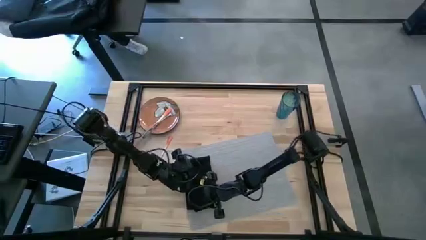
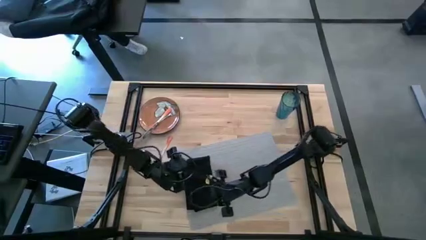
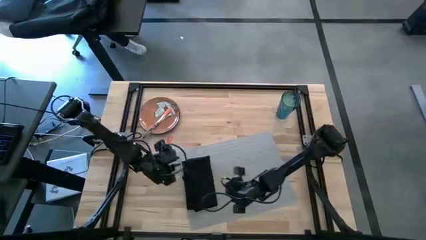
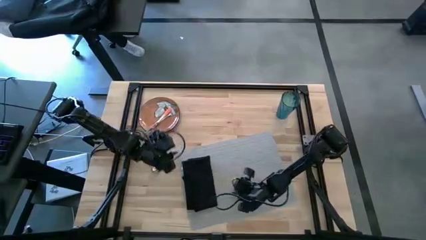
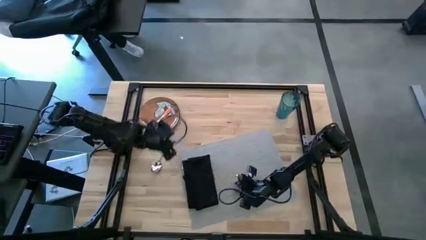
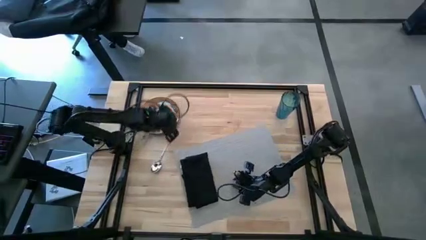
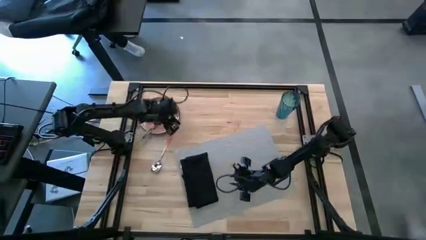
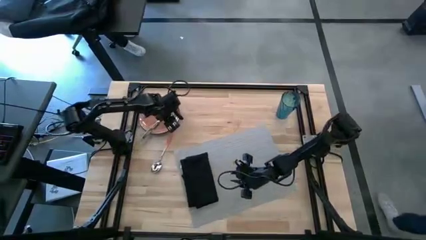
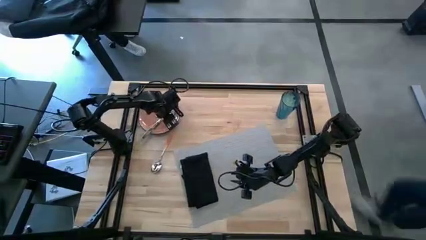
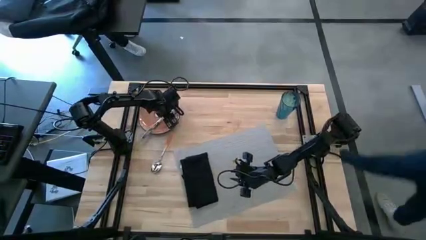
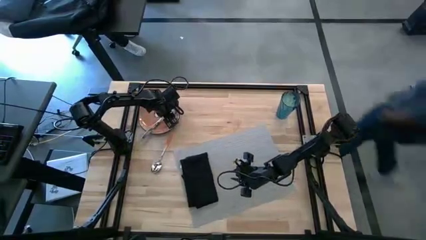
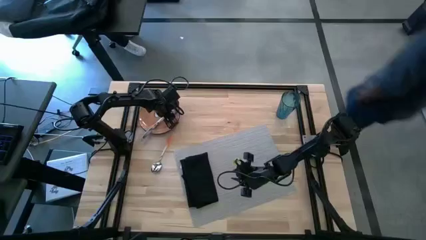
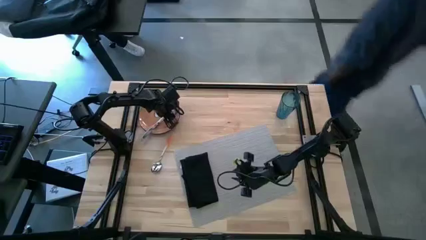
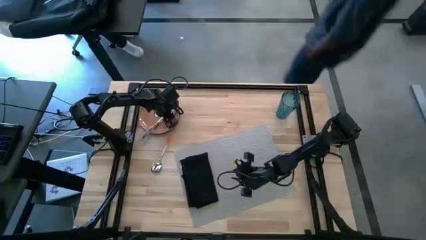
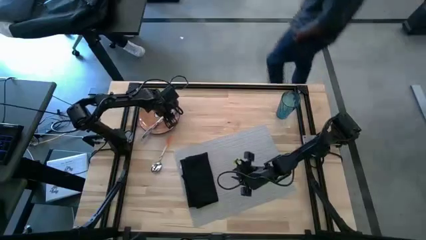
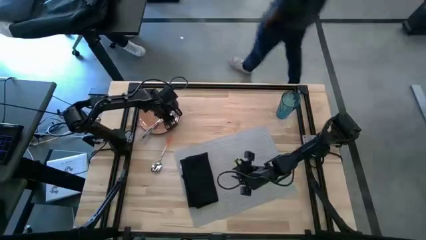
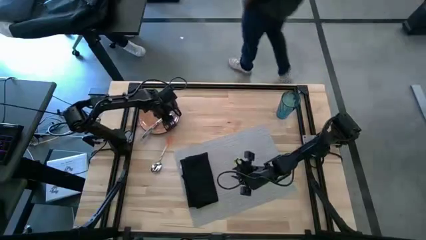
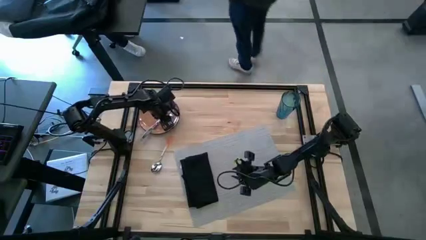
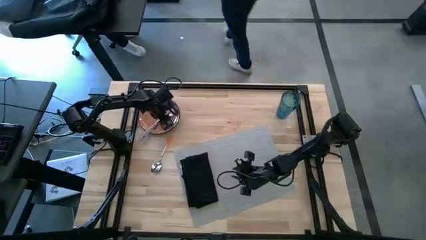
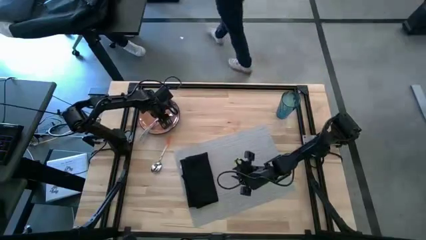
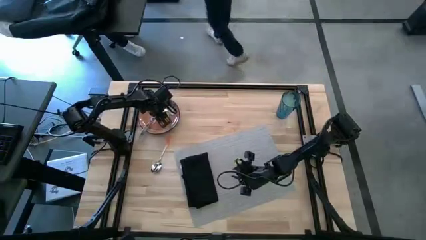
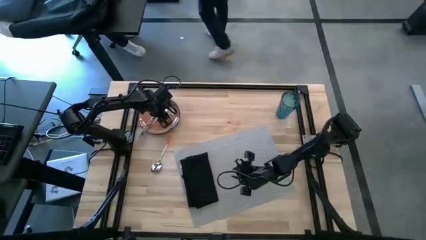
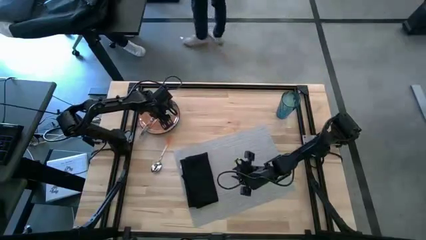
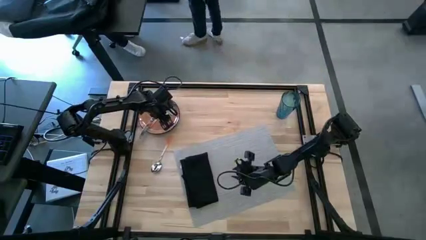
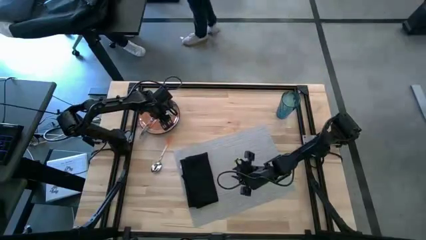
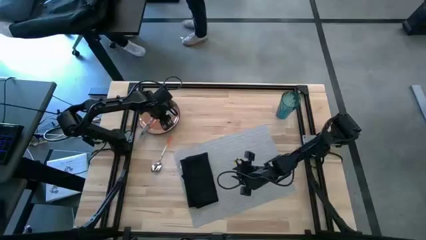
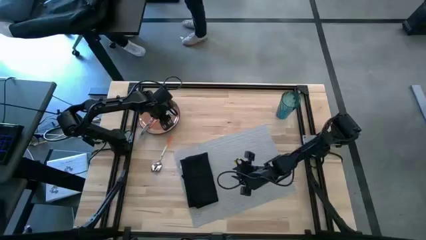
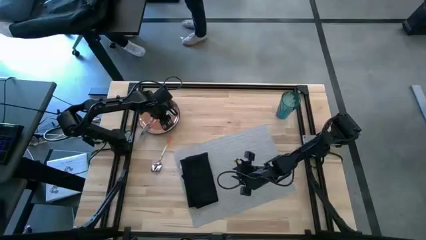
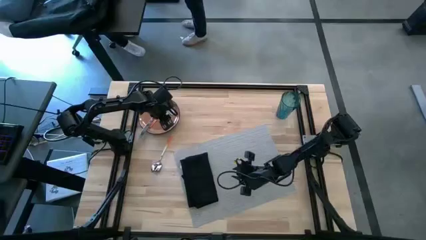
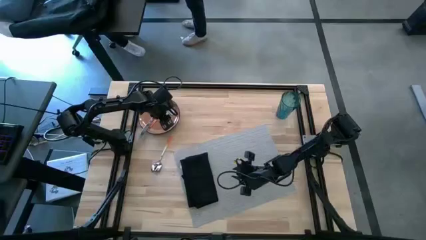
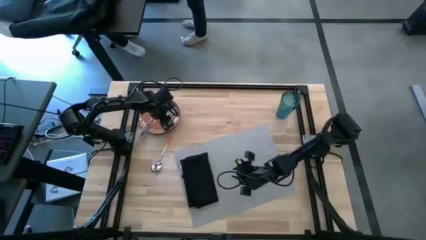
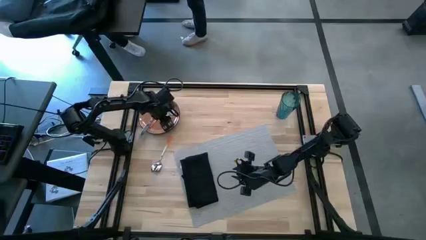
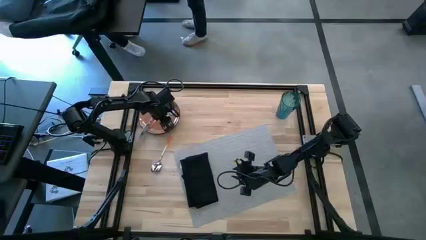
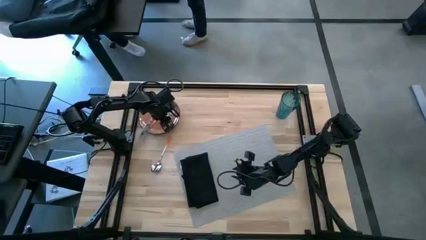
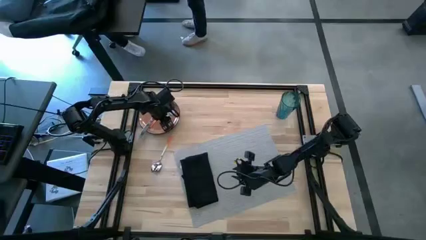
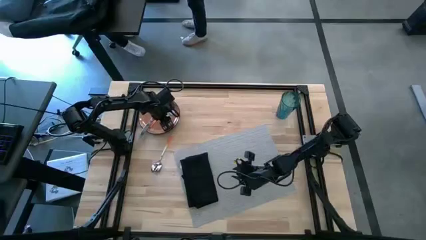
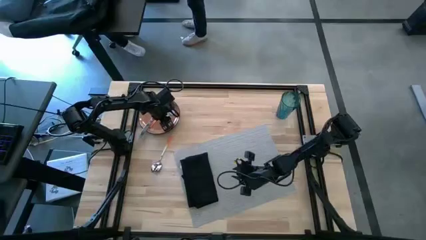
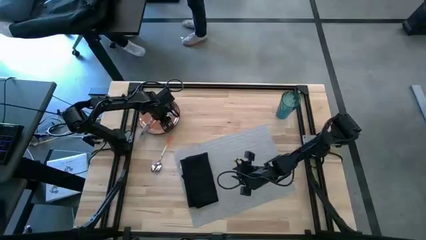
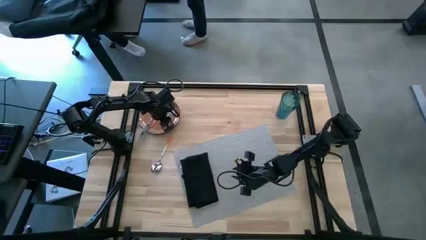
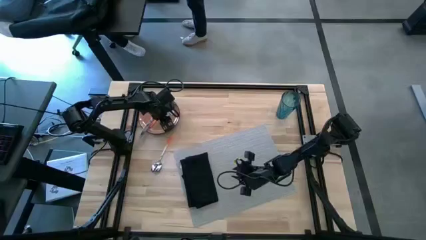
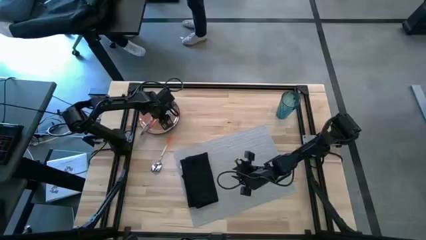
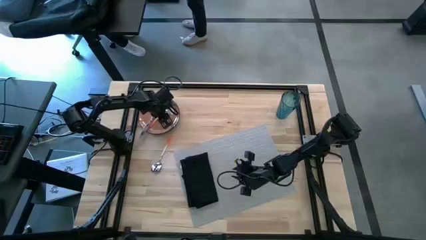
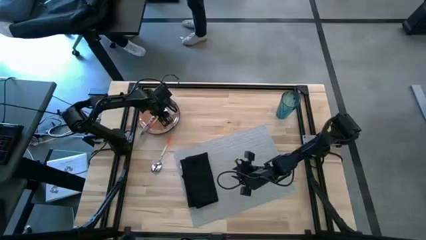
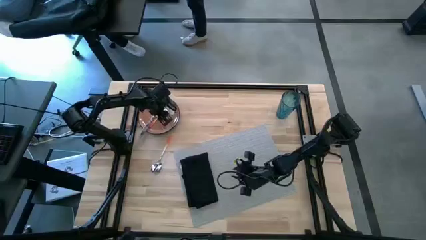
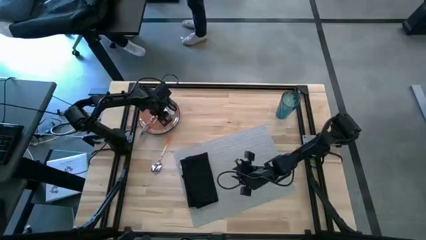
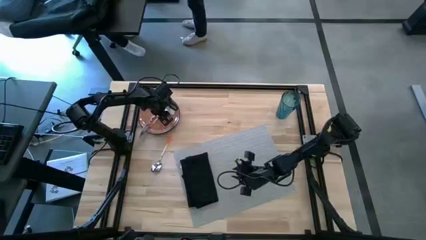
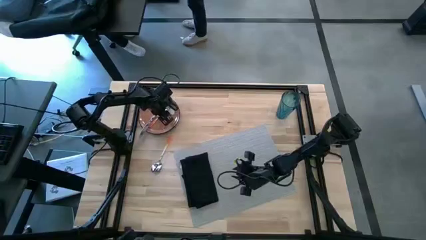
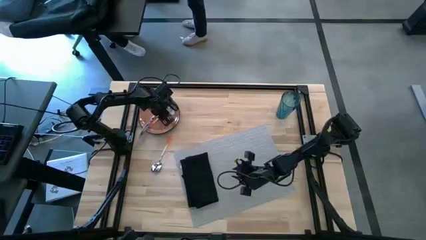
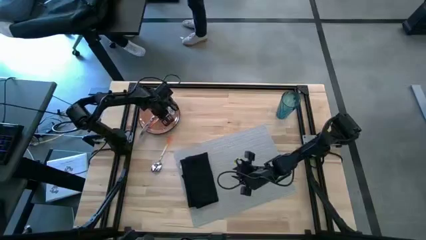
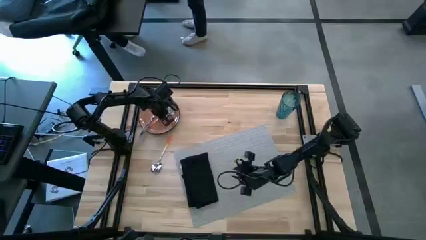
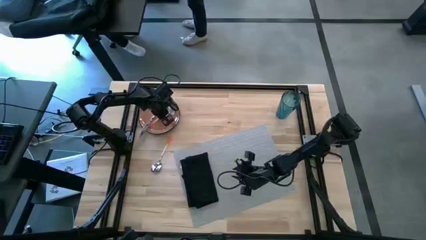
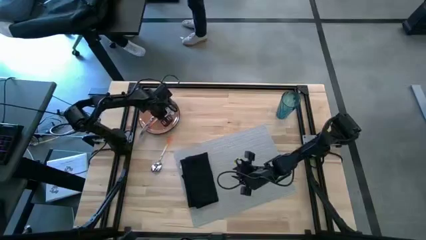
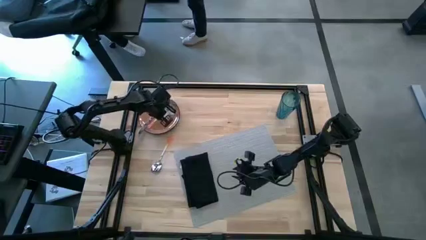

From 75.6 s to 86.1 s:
Task: Set table place
Put the orange fork on the black napkin

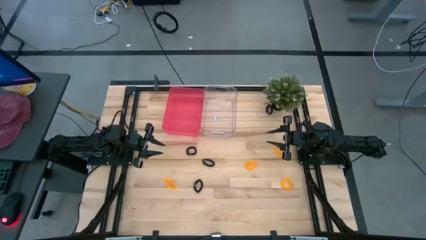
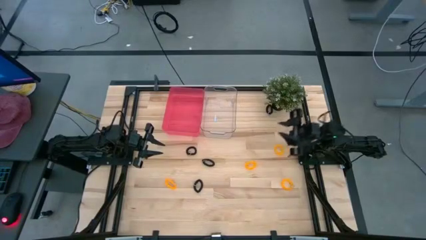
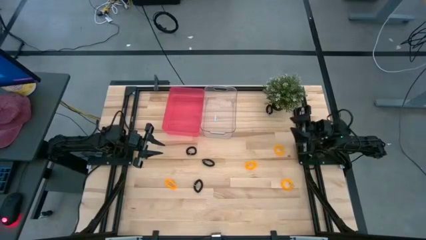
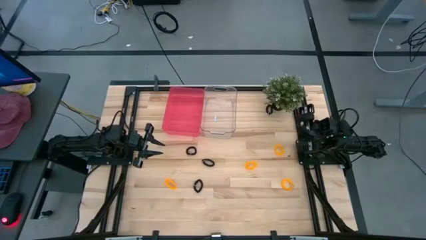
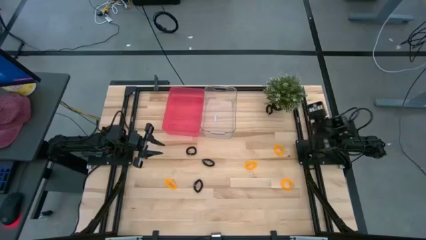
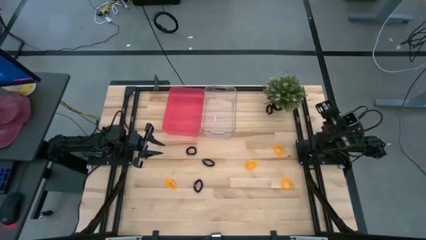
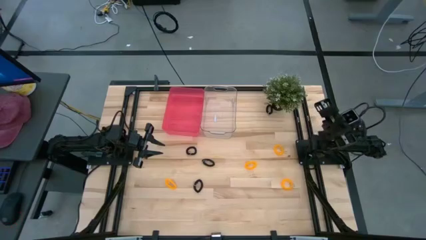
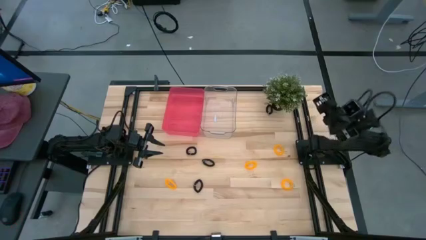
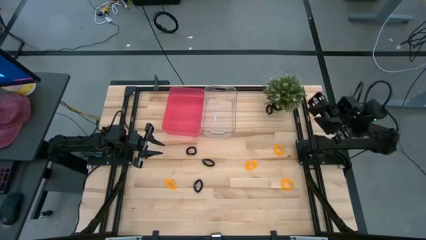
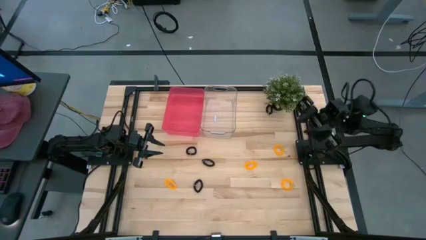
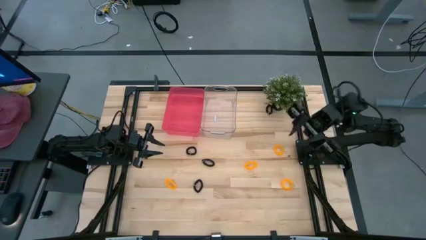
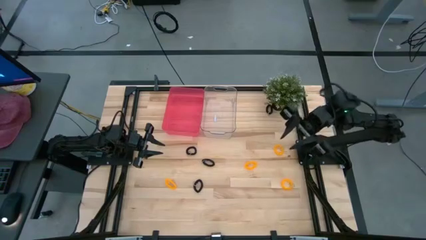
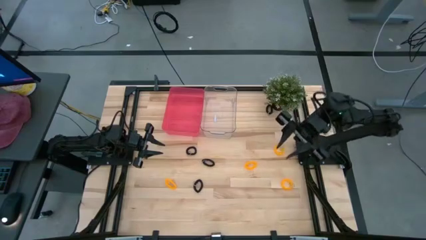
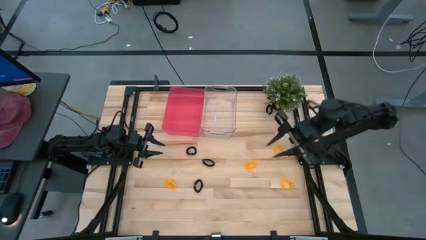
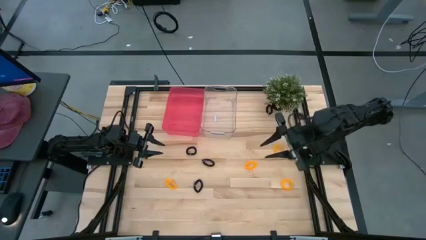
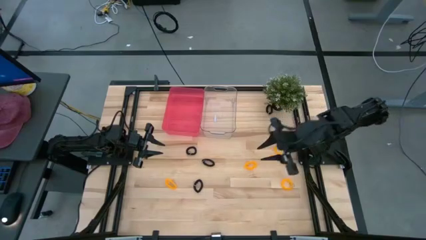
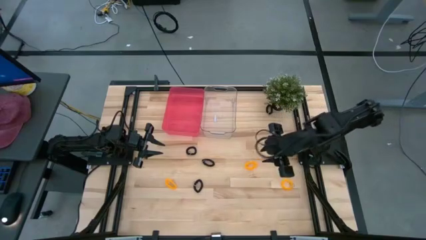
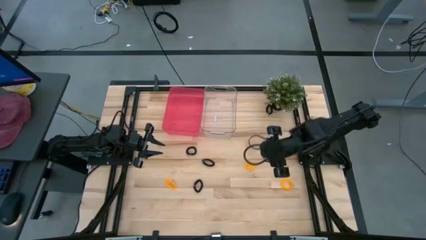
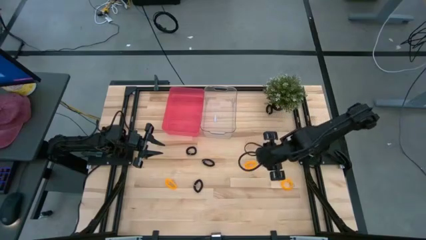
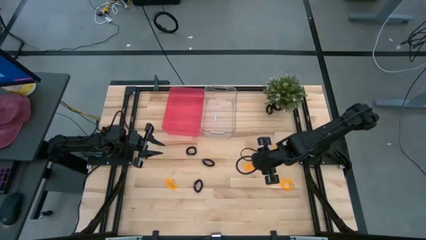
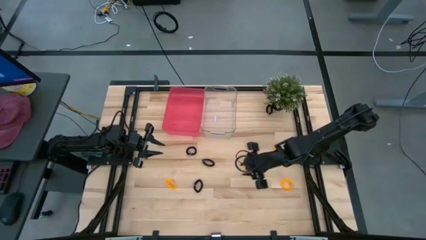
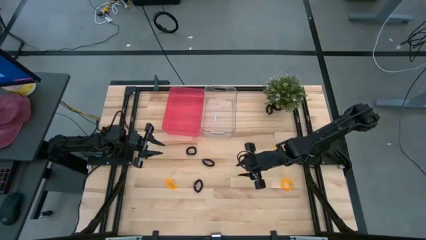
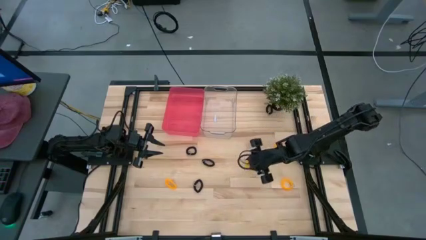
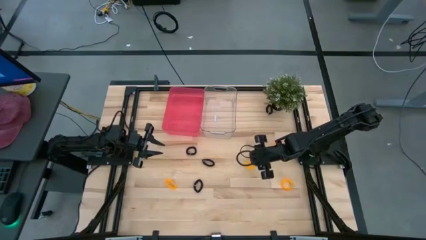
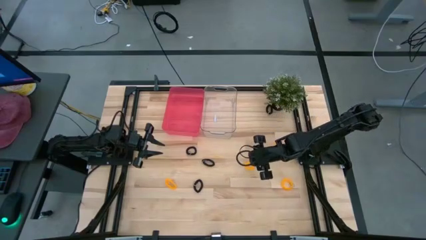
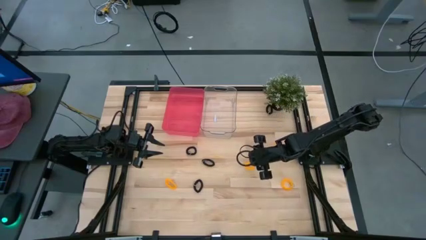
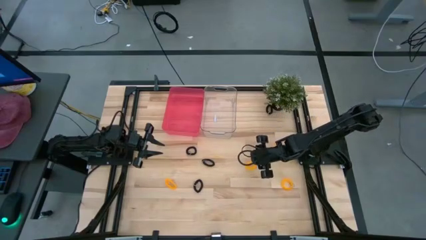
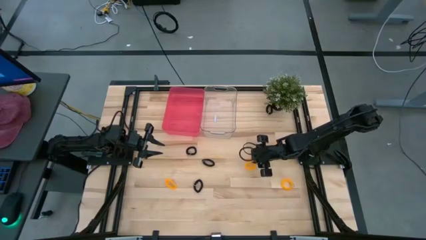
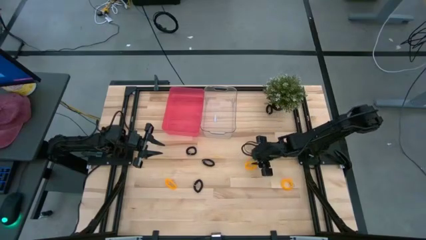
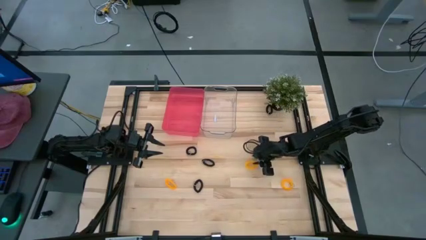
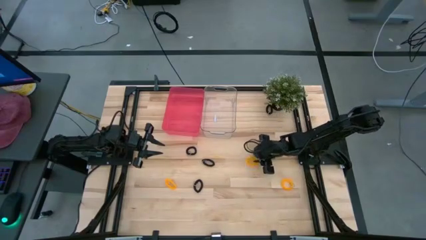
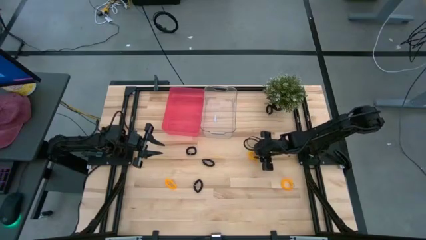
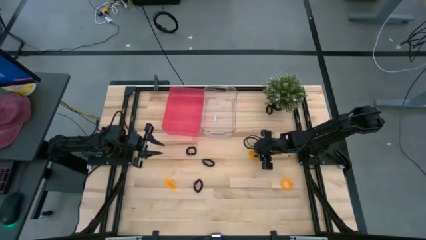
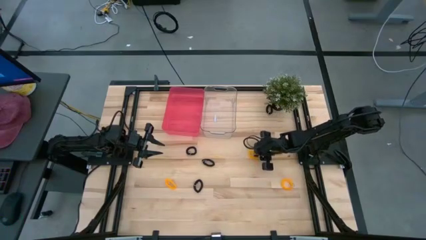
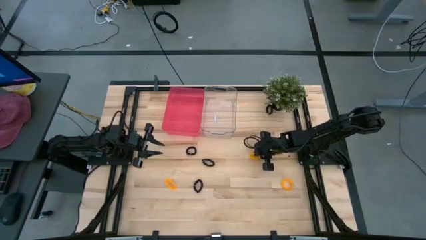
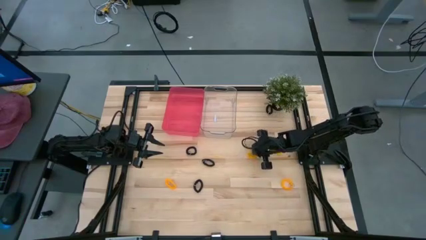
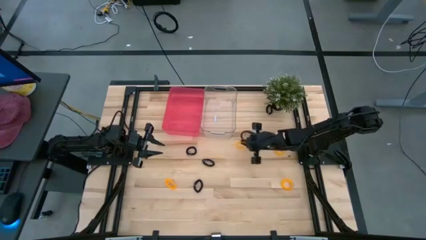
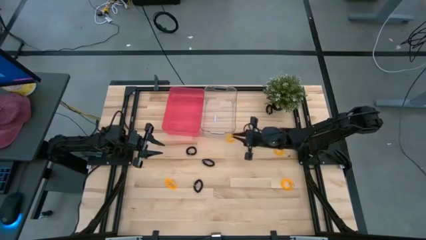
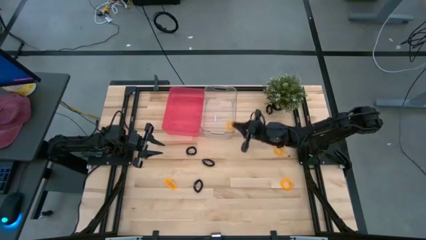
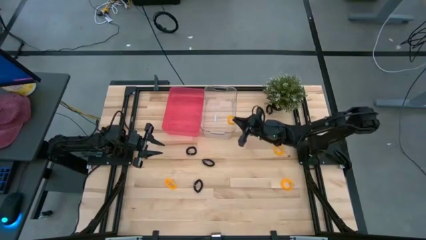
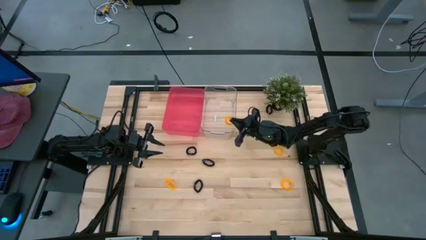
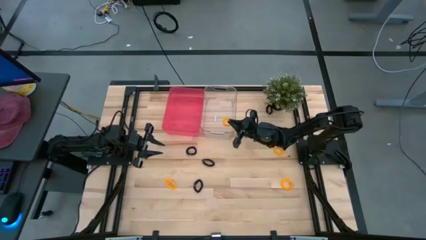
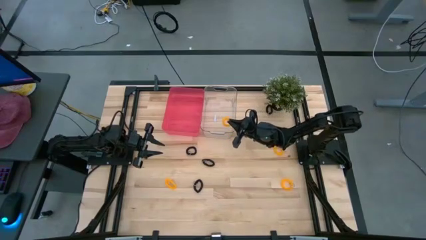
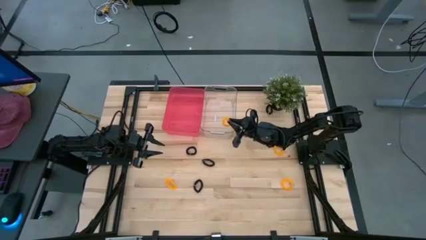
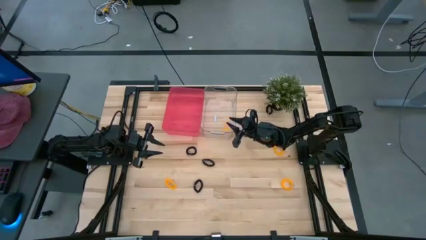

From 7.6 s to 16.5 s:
Task: Sort spring keychains
Put the orange spring keychain into the transparent bin
